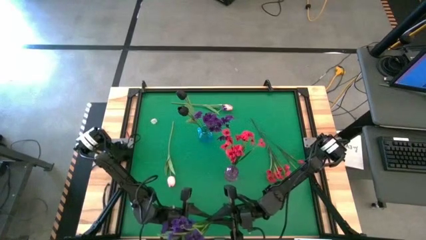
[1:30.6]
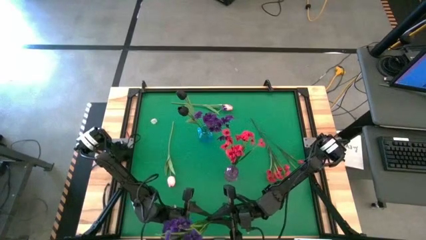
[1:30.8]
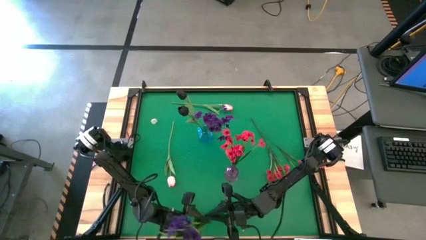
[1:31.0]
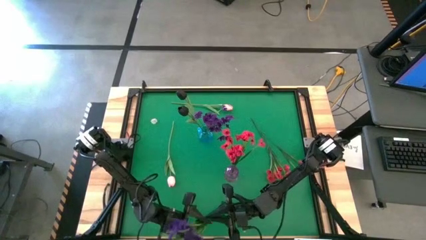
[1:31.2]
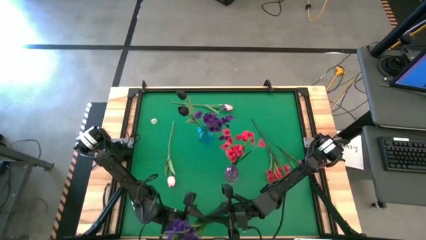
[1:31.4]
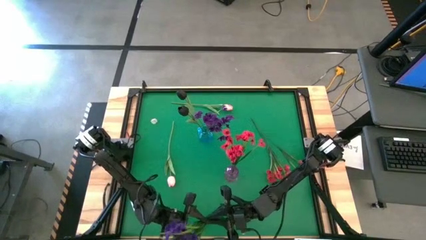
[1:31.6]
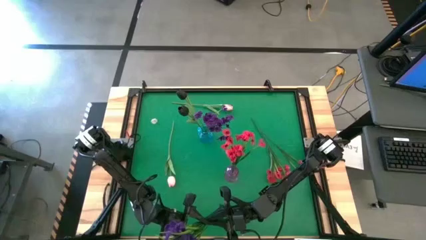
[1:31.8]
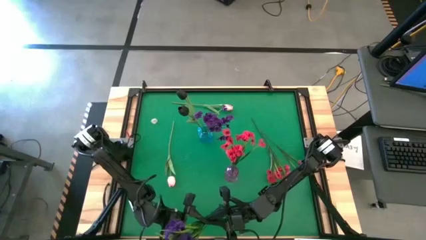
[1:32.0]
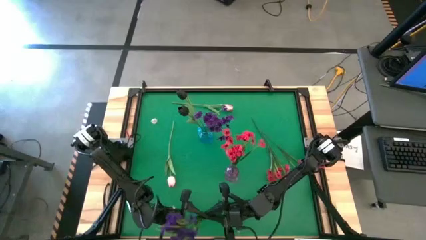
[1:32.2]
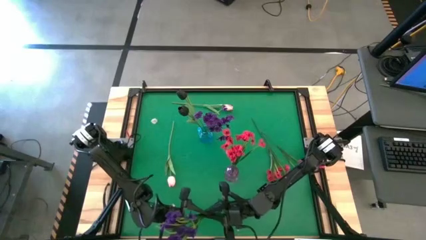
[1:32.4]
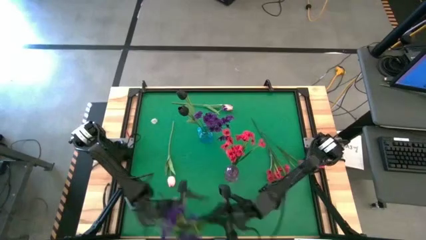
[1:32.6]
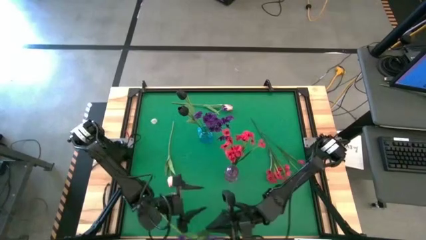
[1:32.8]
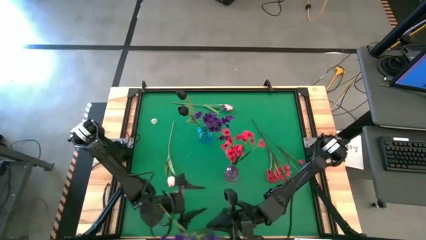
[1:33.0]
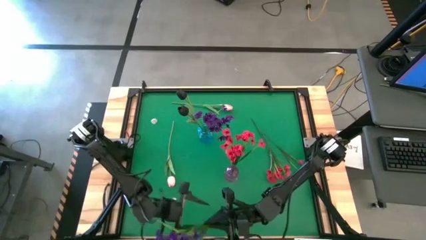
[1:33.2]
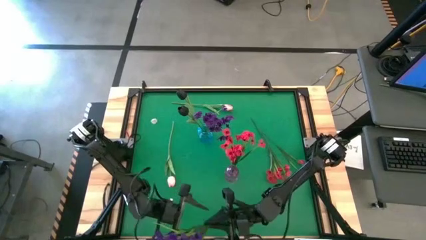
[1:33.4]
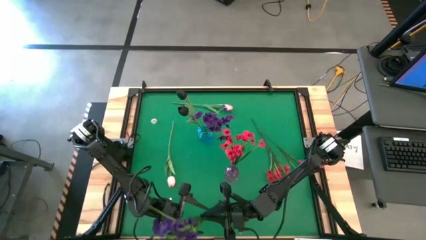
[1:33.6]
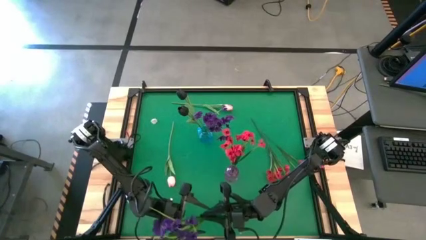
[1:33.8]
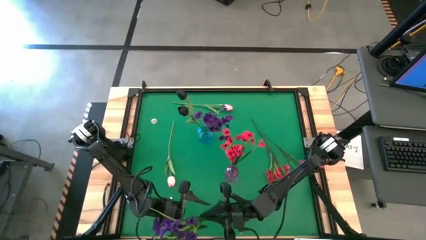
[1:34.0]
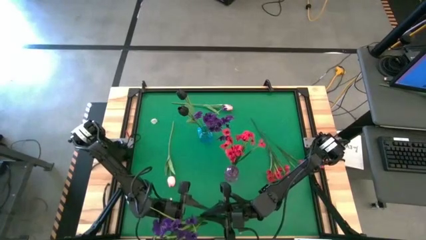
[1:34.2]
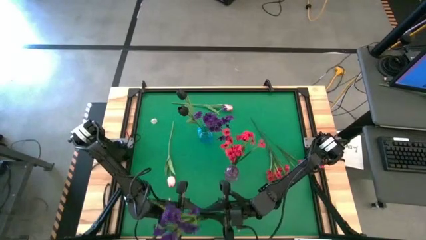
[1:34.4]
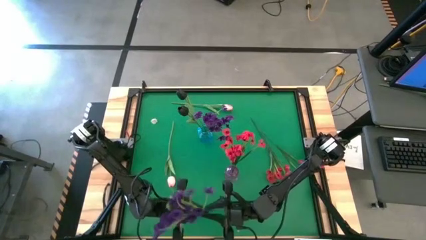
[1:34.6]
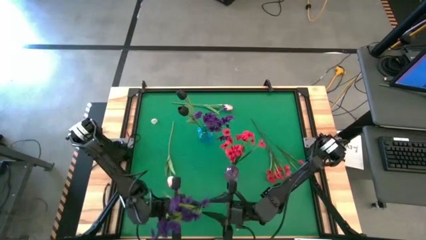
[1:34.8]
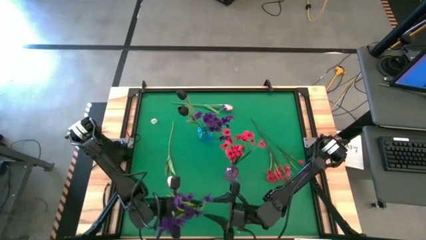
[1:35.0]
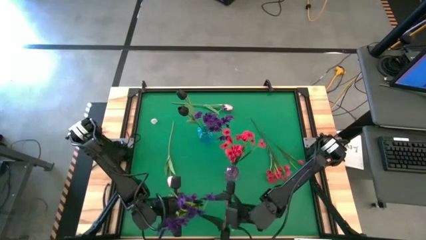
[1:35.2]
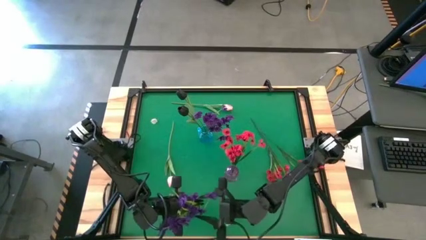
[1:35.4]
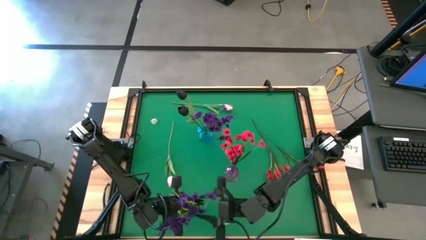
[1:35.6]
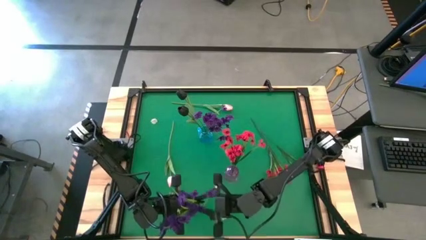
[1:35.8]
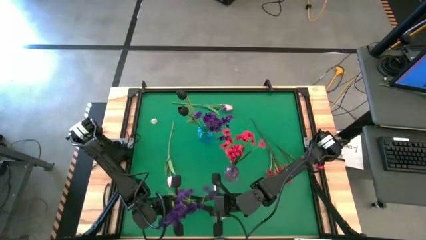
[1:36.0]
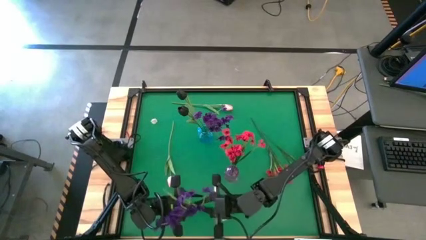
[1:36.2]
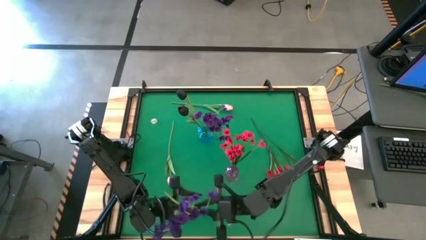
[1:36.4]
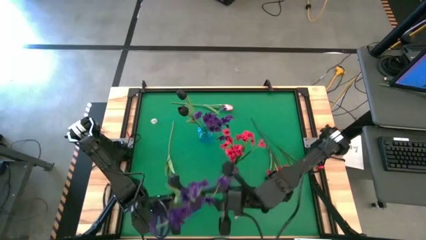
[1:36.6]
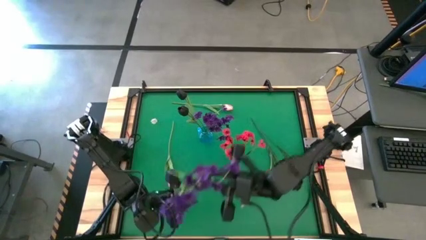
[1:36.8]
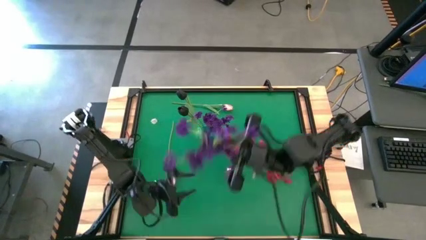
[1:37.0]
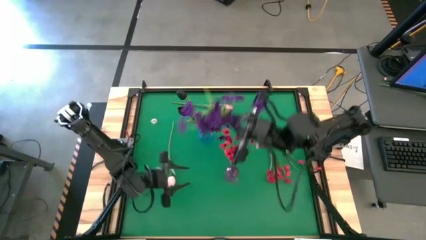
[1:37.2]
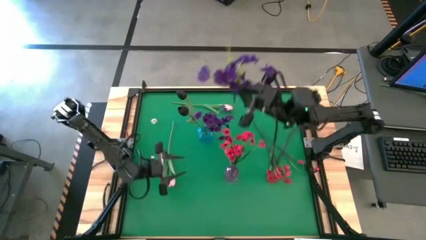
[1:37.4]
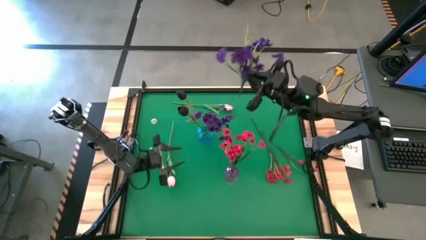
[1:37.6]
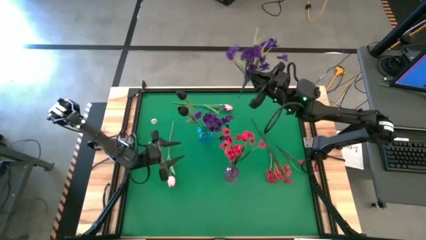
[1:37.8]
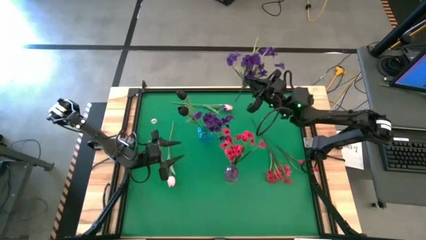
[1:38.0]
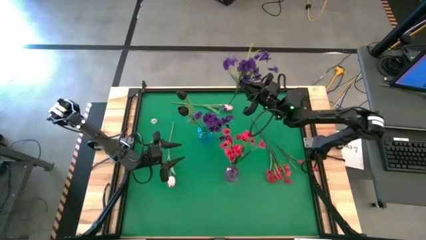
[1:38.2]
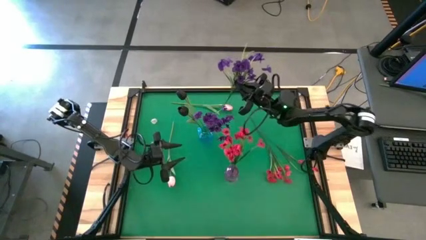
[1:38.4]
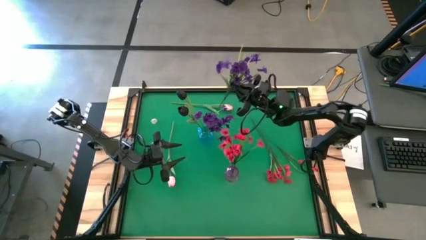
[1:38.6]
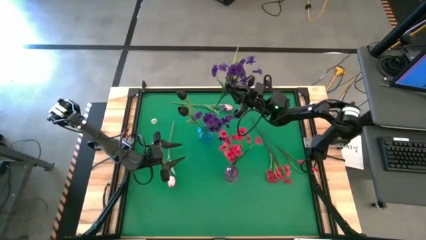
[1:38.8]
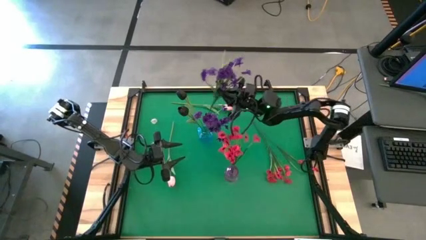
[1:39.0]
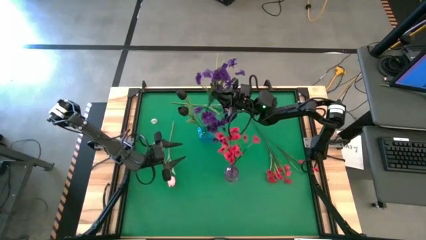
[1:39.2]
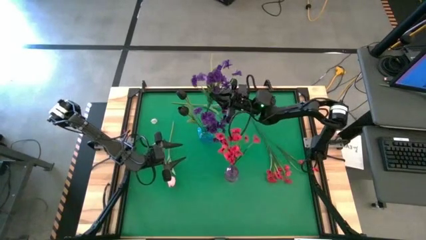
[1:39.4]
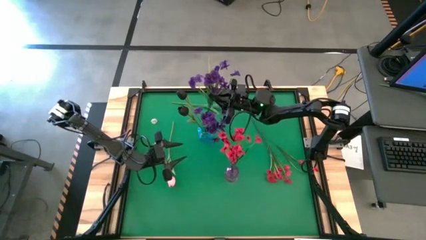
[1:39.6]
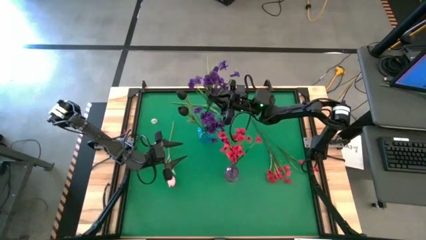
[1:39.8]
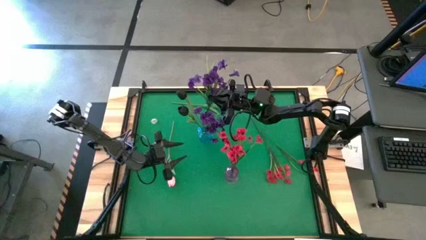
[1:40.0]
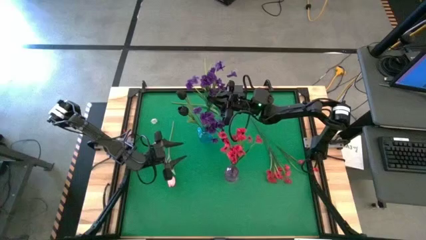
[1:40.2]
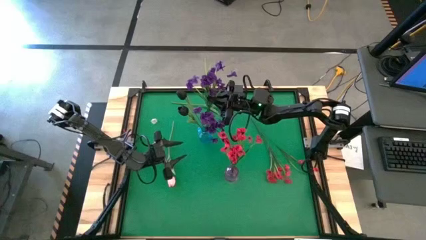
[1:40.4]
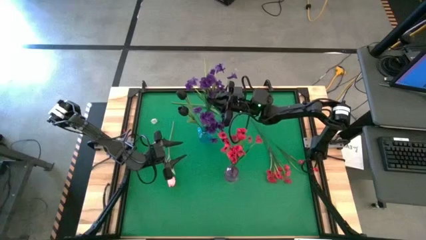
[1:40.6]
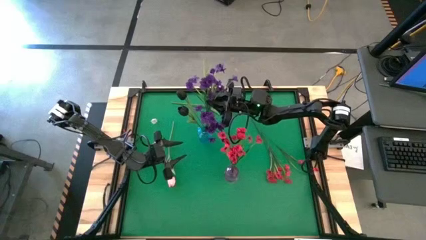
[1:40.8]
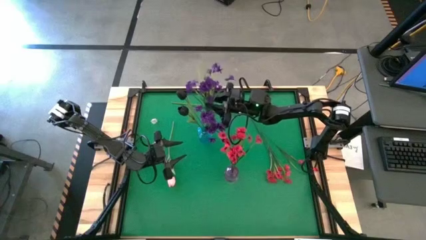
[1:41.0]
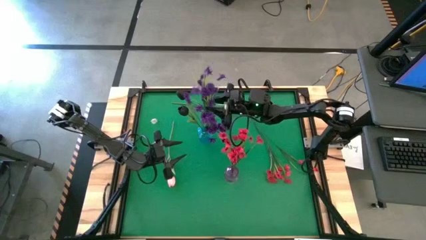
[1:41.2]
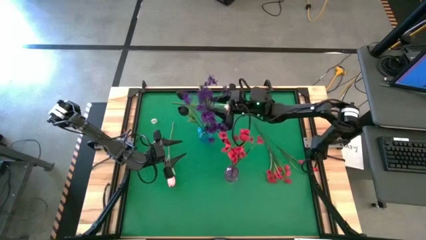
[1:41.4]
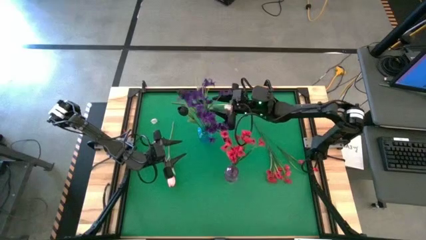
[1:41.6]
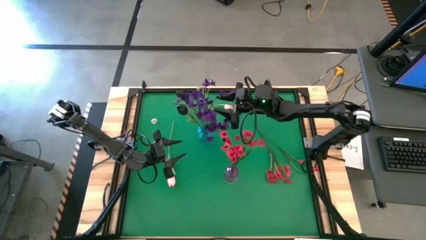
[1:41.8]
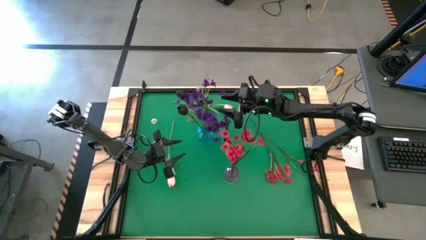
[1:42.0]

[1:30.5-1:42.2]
Task: Sort flowers into vase by color
Put the purple flowers into the blue vase

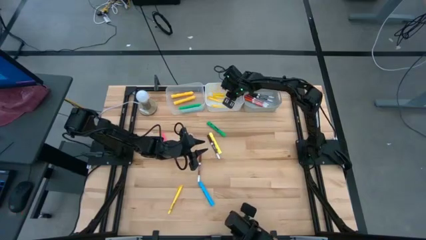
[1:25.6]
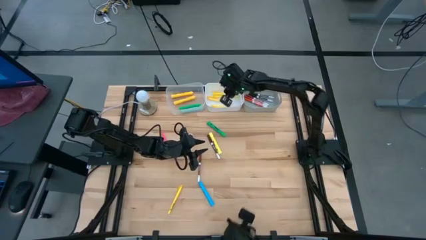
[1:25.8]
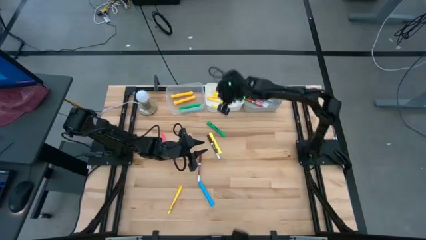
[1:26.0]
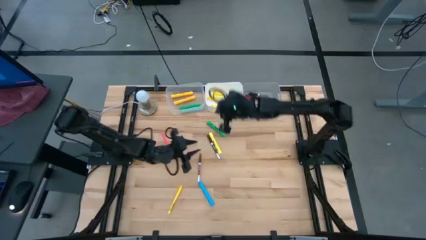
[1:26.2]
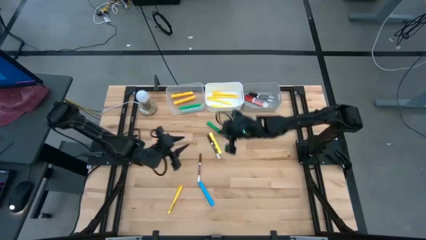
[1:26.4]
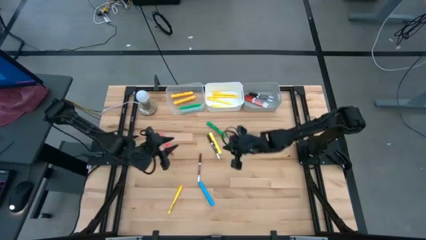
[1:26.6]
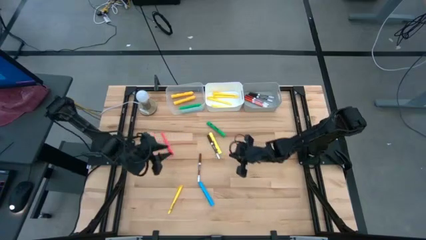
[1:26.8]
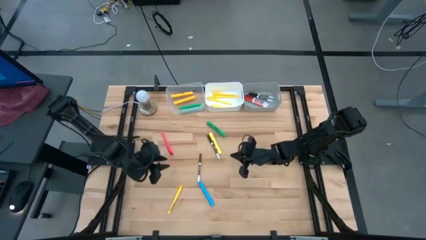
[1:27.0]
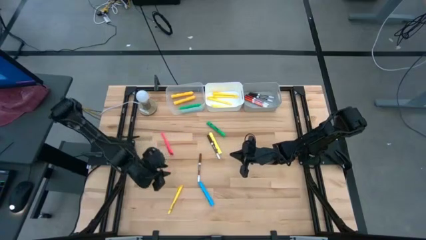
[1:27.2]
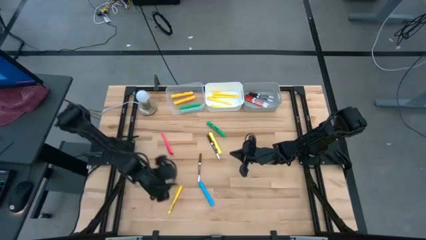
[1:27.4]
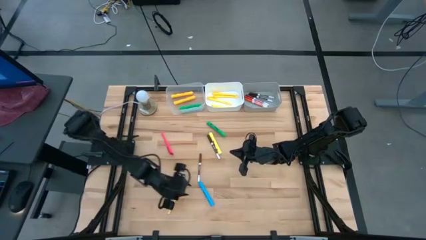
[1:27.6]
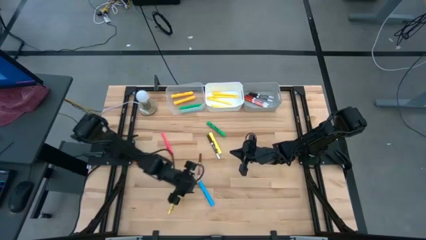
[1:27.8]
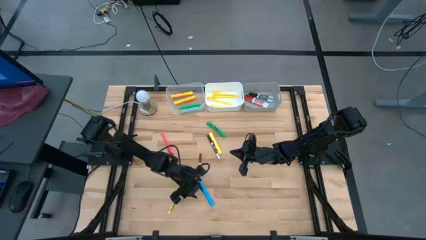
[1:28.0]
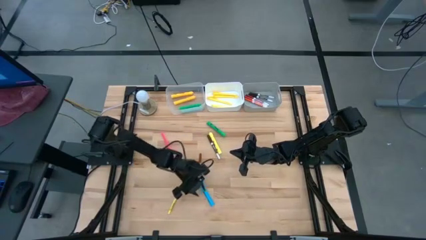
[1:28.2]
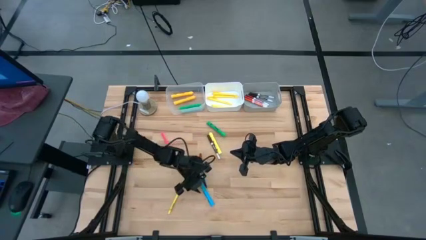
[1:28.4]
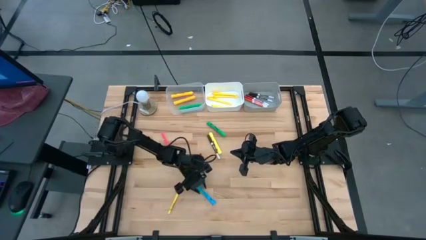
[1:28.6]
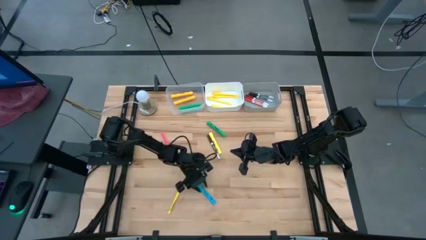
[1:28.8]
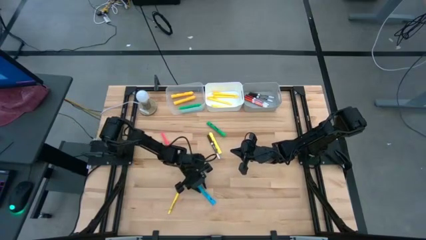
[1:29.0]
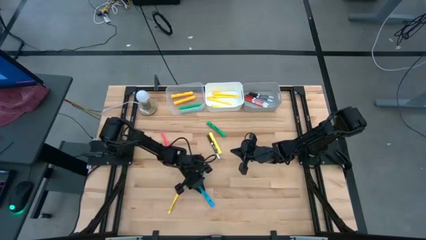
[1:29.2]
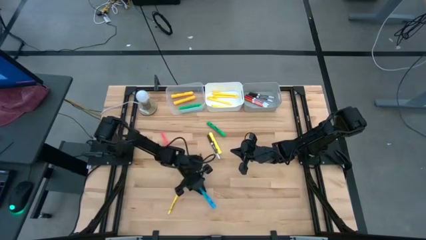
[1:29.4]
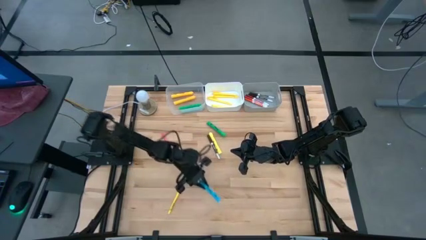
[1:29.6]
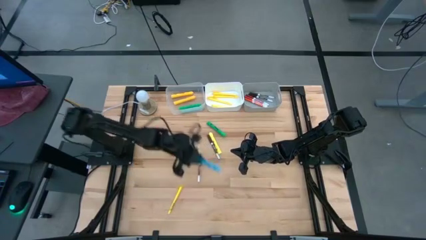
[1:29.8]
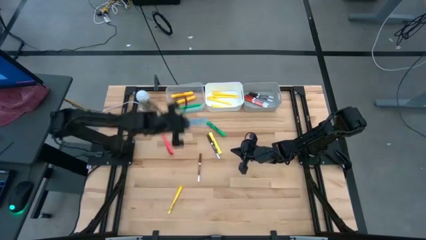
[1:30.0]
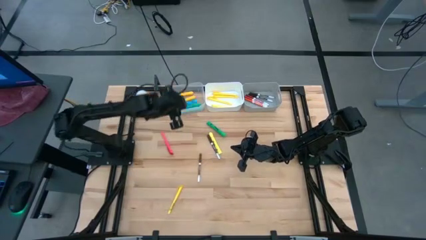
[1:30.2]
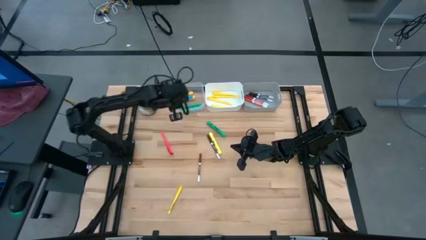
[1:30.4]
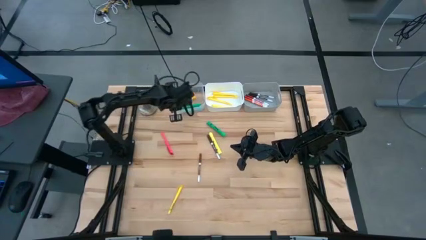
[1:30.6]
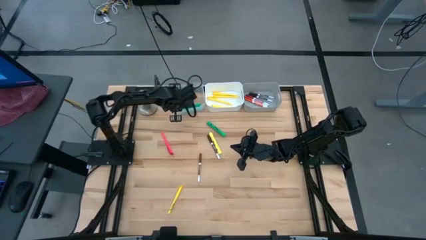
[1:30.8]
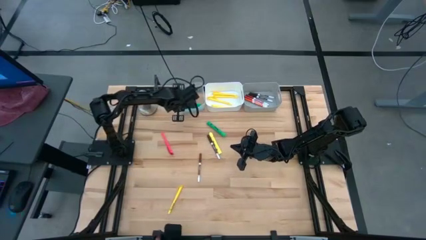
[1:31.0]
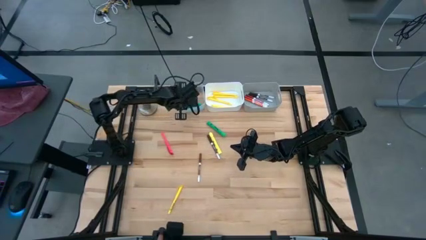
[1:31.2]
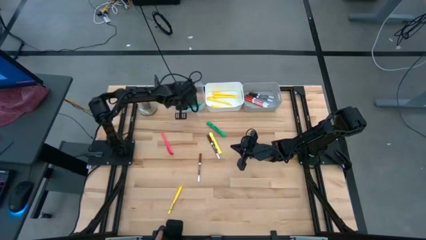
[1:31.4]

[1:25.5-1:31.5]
Task: Pick & Place Markers
Put the blue highlighter pen into the transparent bin
